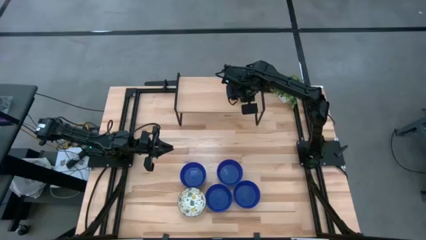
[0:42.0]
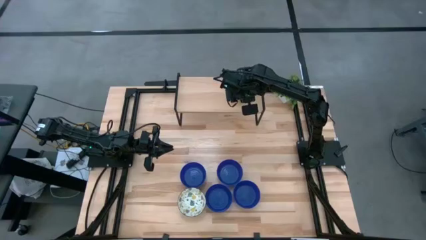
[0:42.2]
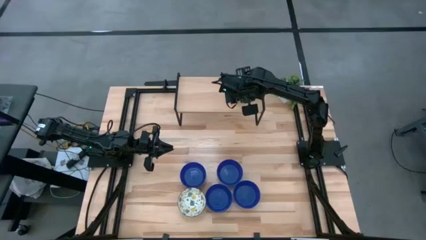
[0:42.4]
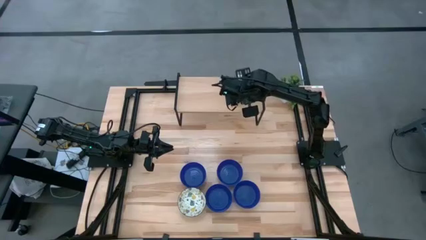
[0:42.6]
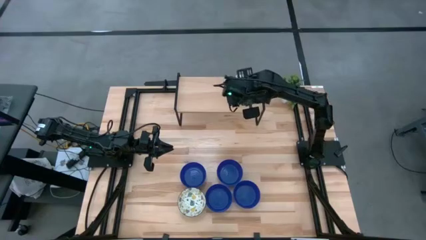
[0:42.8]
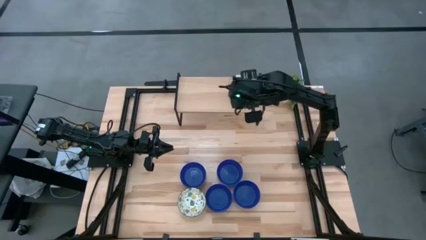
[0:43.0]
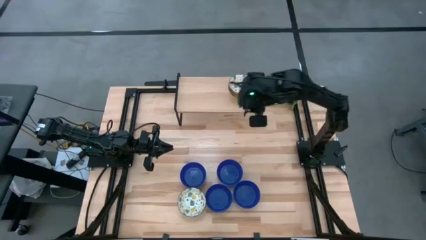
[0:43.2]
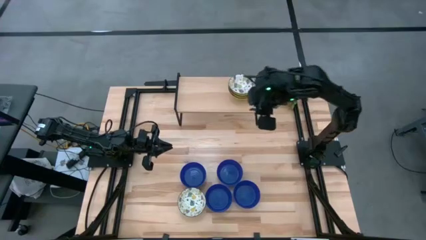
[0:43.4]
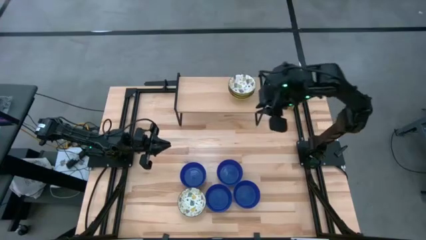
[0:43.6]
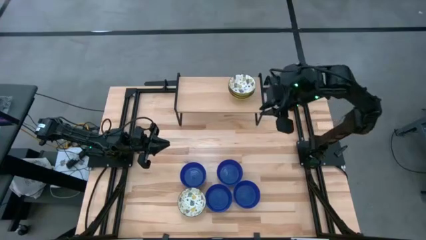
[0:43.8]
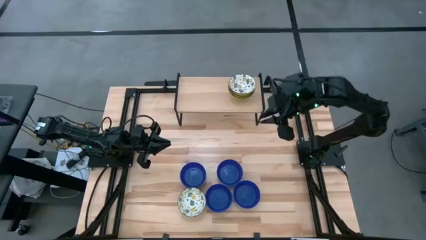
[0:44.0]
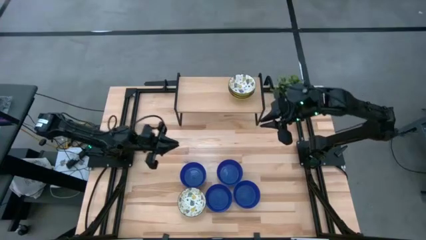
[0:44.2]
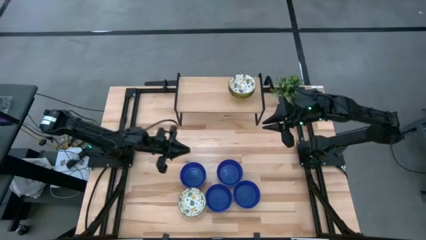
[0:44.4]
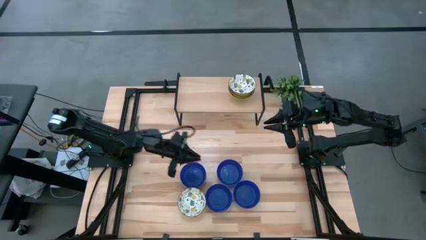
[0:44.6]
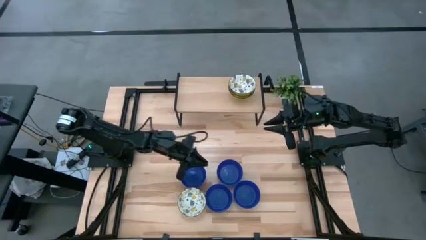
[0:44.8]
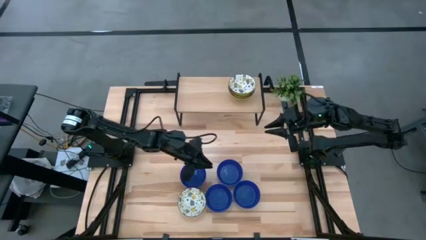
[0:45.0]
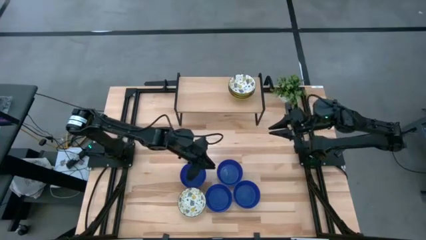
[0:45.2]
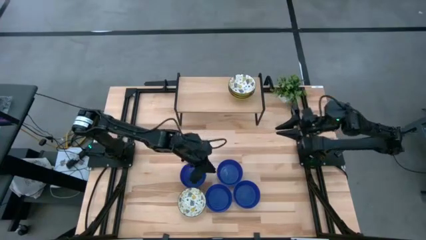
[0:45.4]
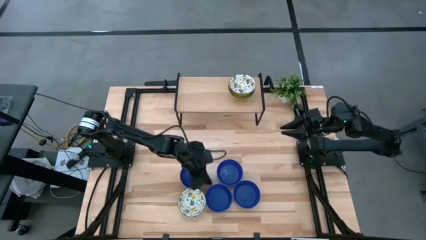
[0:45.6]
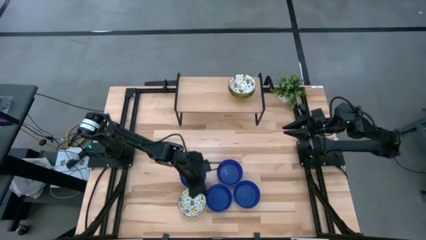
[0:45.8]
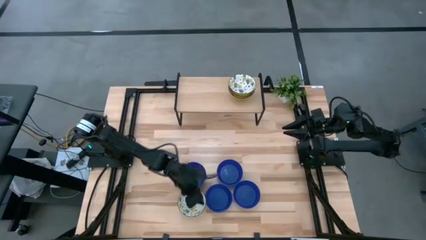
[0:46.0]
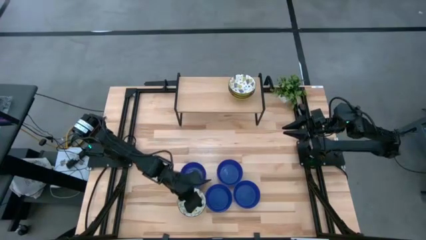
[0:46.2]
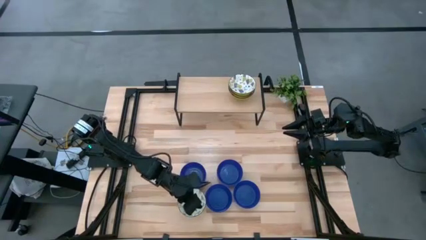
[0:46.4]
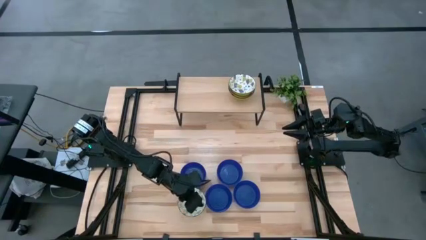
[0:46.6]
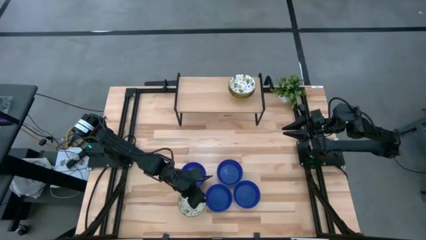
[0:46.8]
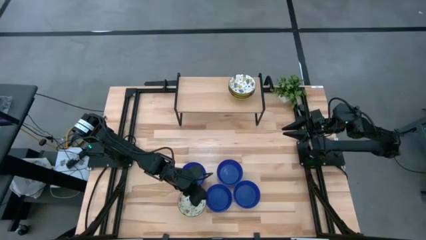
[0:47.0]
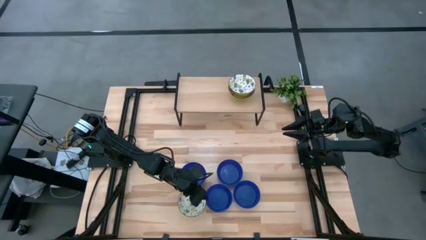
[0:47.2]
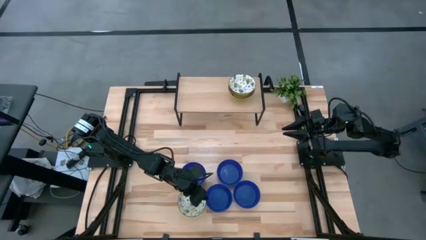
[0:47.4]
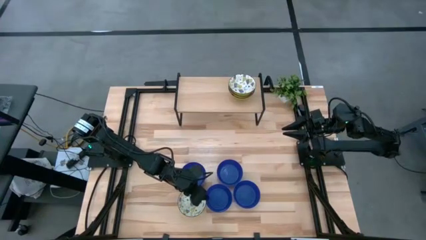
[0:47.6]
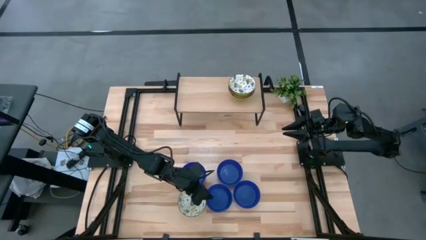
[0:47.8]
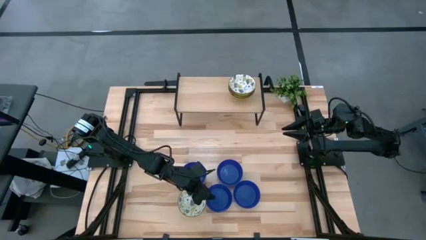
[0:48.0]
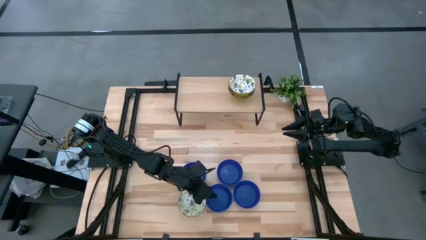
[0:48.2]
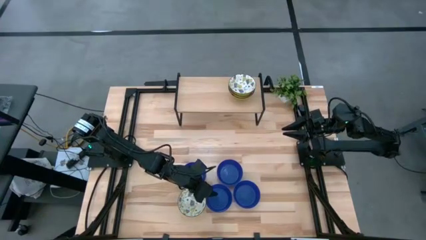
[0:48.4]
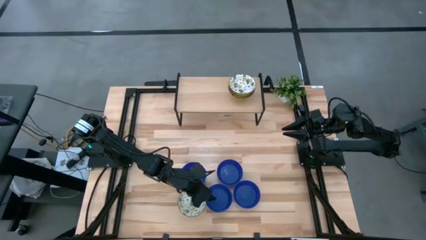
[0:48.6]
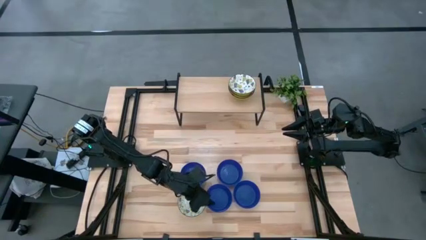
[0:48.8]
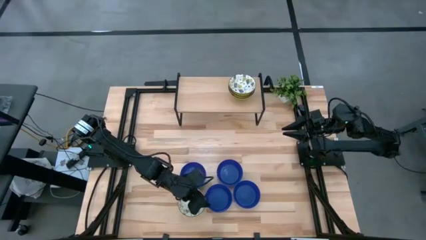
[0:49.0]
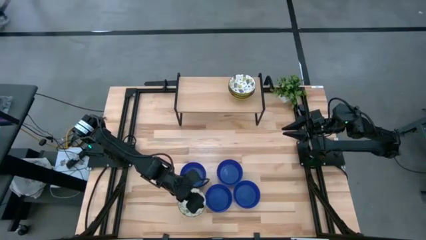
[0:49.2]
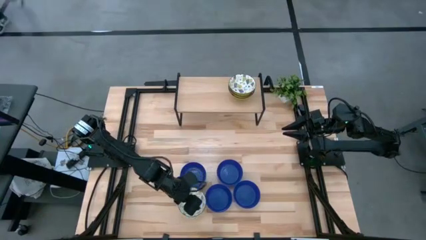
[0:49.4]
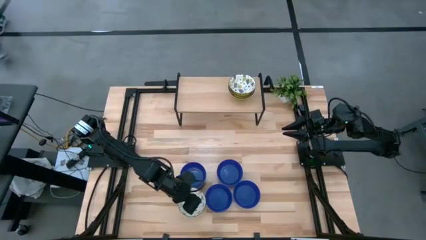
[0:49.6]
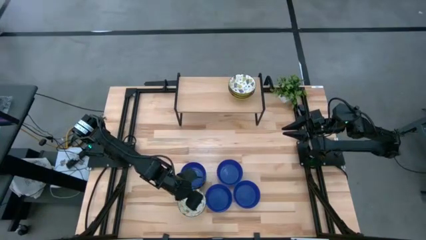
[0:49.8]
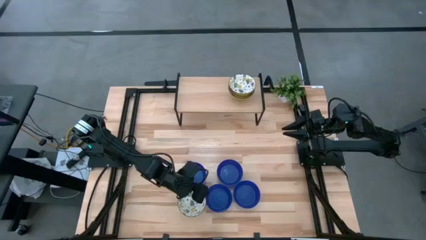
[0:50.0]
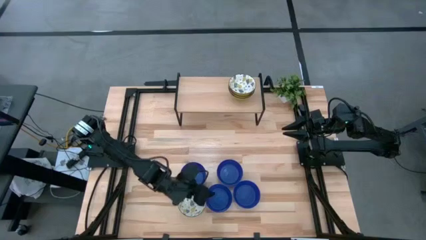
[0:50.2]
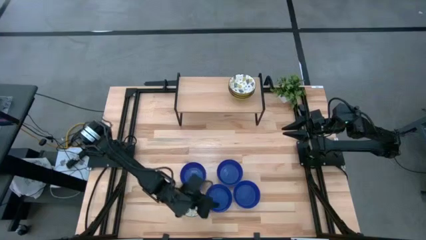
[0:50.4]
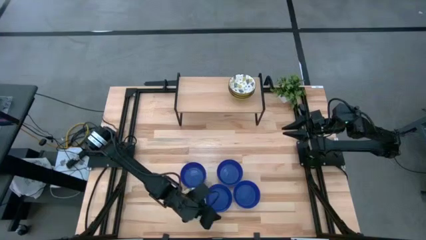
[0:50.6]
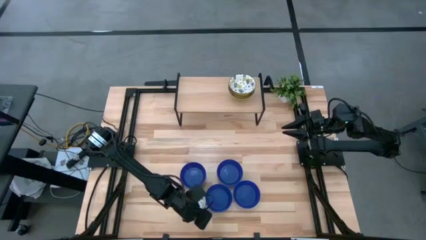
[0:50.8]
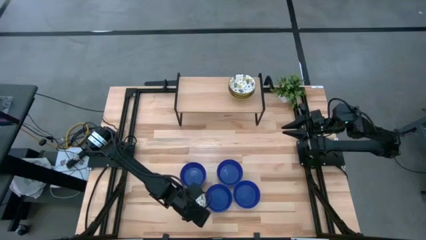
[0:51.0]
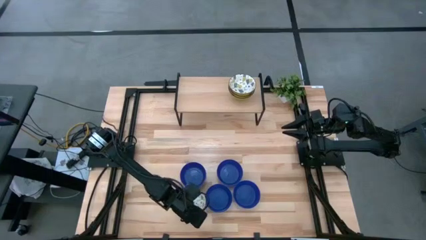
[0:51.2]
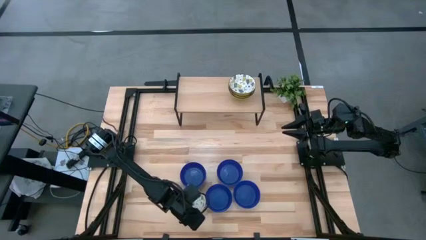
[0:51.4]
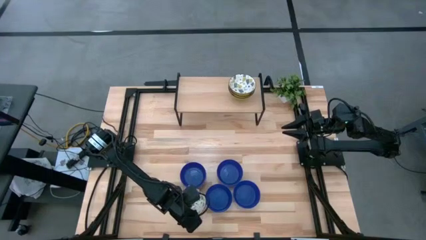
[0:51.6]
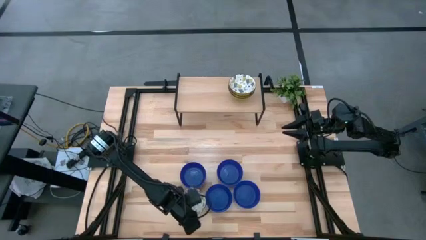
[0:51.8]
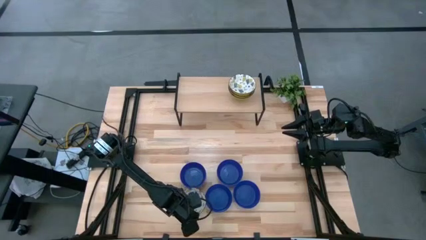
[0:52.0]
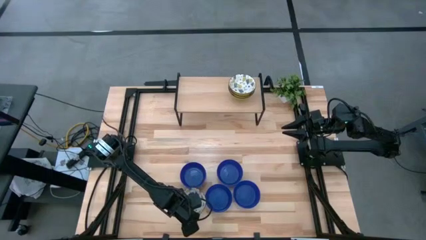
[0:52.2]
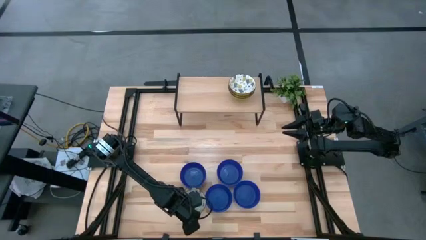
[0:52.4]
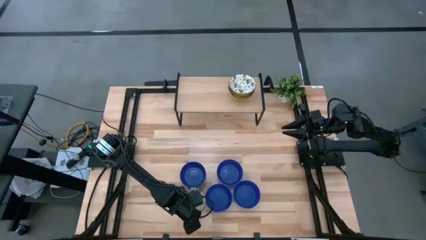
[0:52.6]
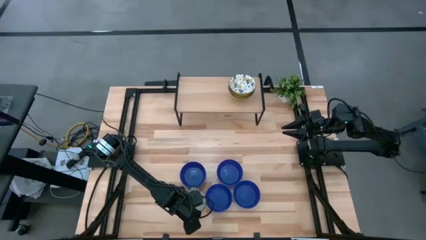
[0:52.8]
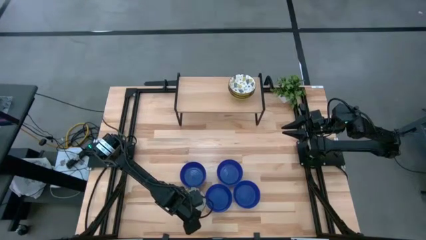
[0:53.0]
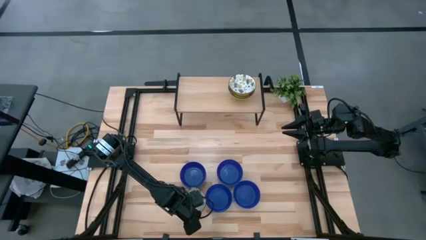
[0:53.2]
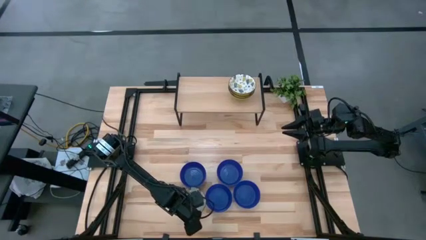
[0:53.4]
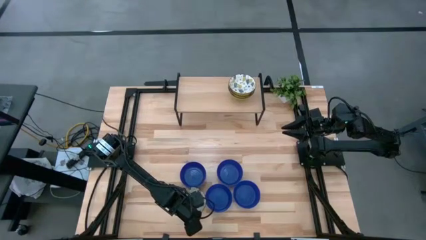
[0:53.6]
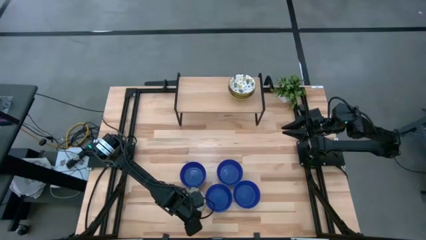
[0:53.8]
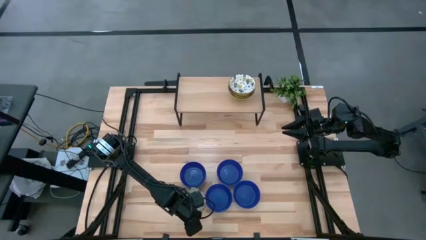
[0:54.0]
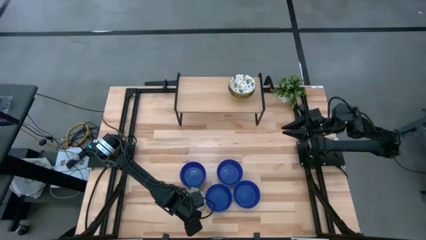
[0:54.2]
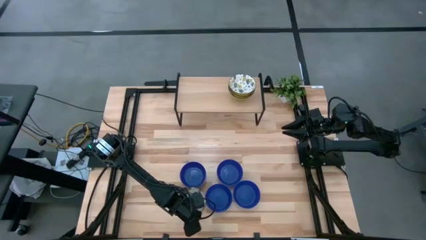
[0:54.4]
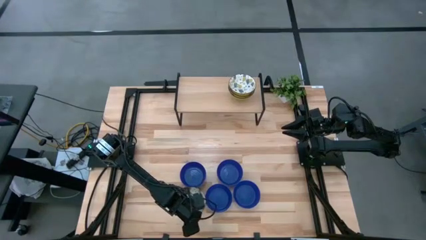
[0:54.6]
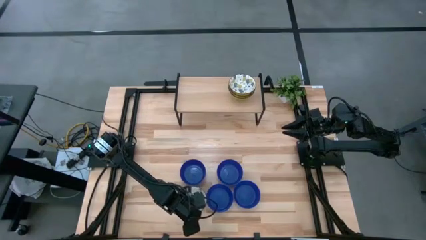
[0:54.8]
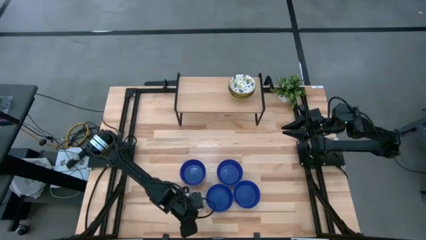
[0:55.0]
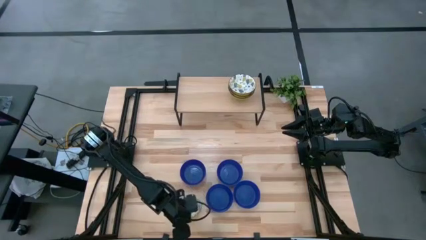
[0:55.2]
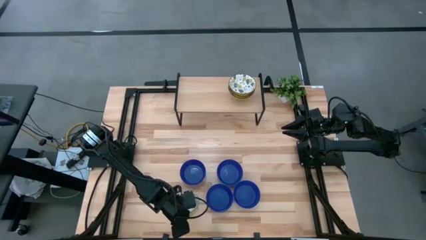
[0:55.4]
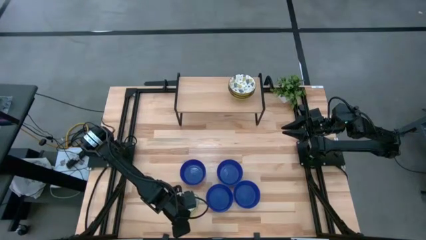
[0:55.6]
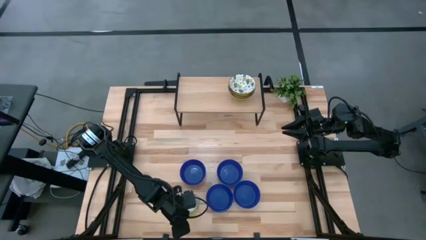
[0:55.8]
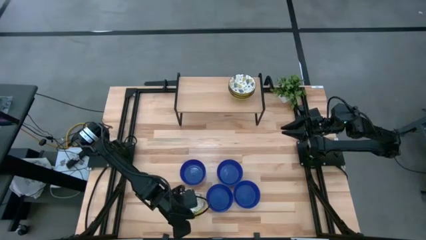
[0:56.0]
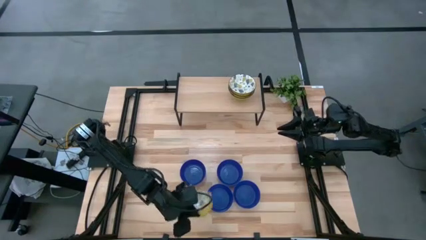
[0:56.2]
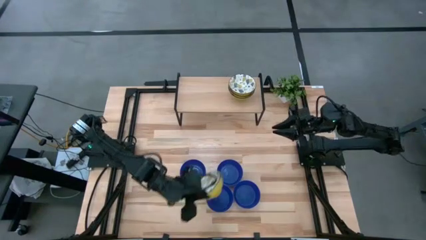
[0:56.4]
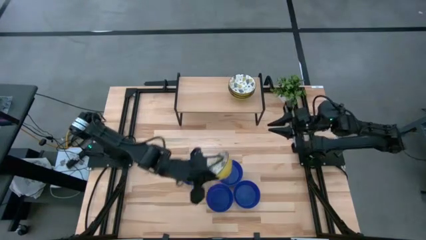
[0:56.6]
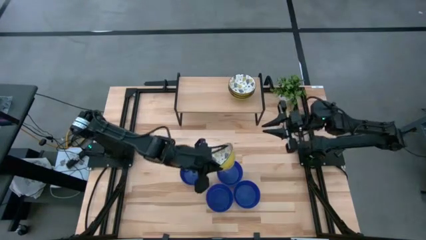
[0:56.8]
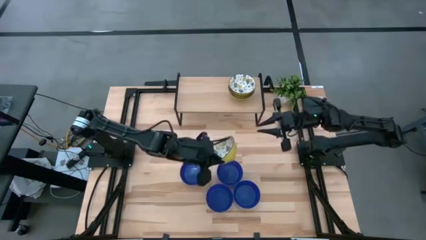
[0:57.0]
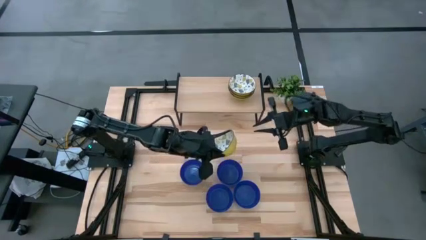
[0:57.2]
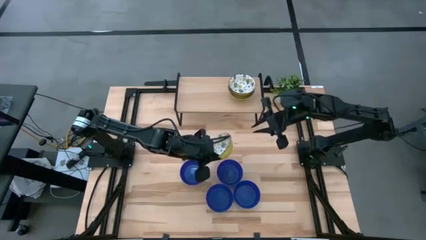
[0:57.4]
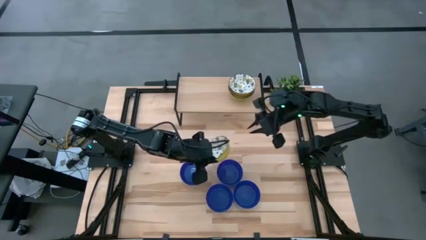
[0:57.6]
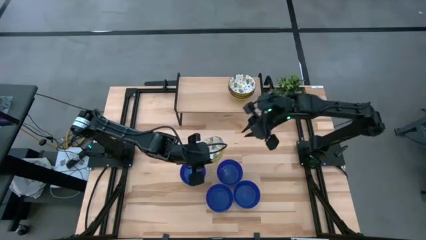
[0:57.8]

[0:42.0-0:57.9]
Task: Pick & Place Mini bowls
Stack the yellow bowl on top of the yellow bowl on the shelf
